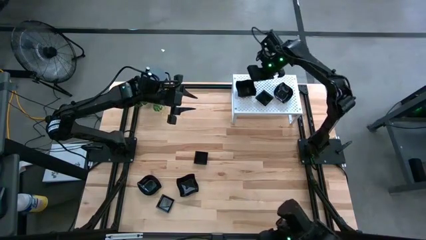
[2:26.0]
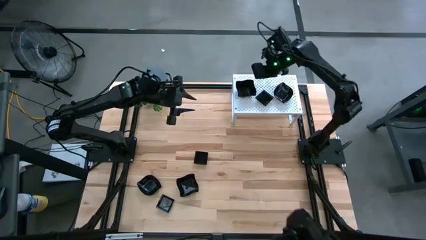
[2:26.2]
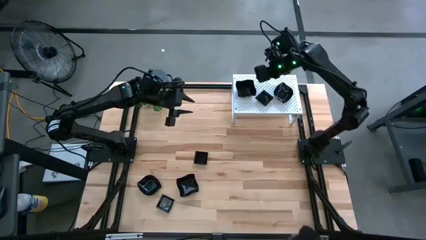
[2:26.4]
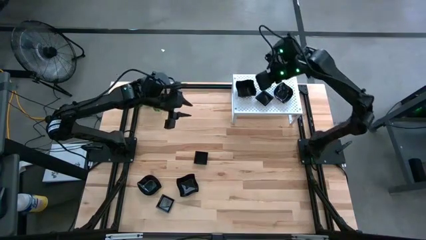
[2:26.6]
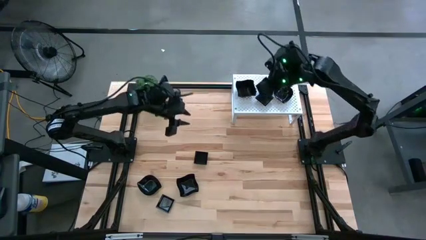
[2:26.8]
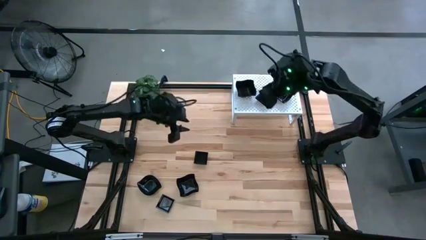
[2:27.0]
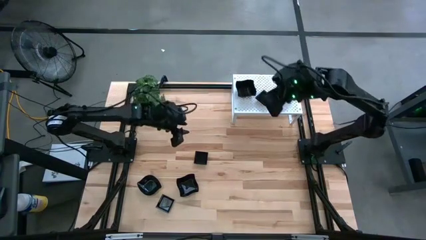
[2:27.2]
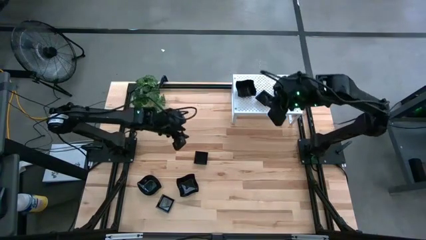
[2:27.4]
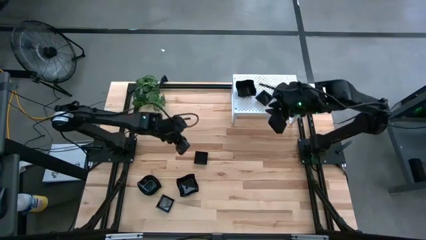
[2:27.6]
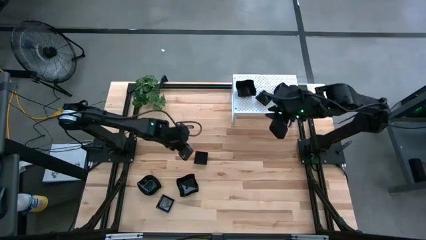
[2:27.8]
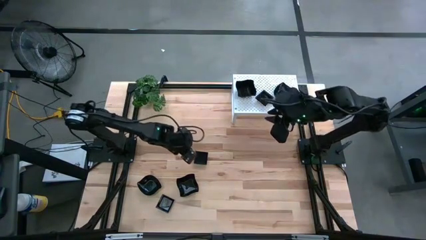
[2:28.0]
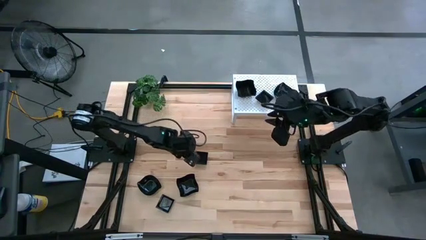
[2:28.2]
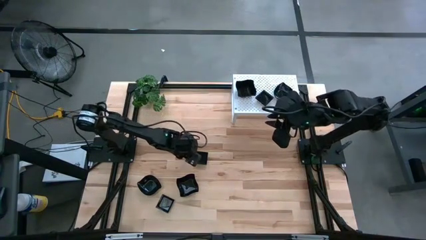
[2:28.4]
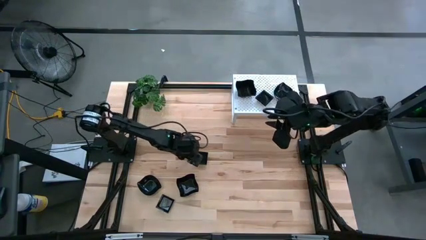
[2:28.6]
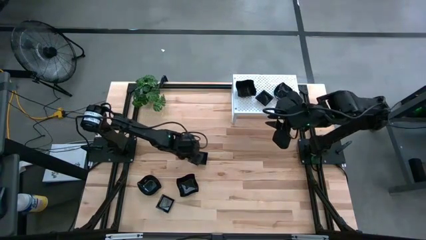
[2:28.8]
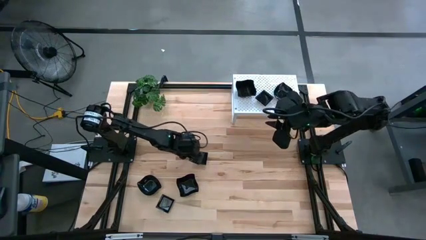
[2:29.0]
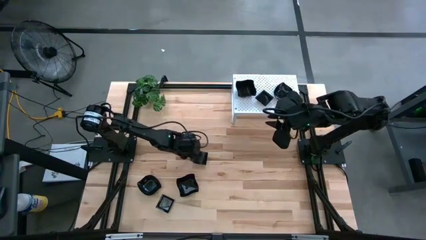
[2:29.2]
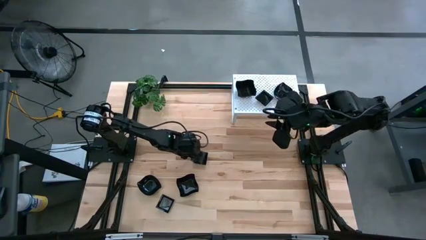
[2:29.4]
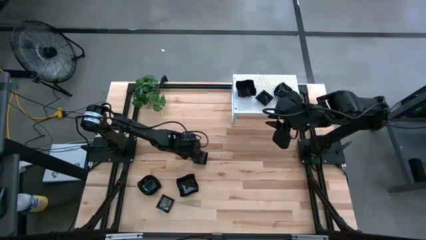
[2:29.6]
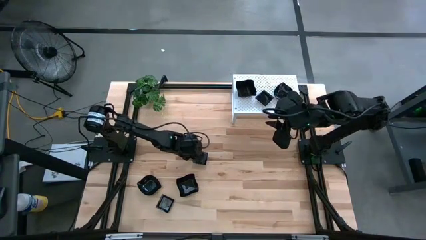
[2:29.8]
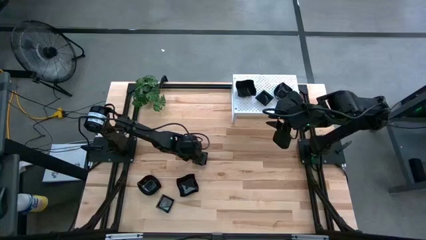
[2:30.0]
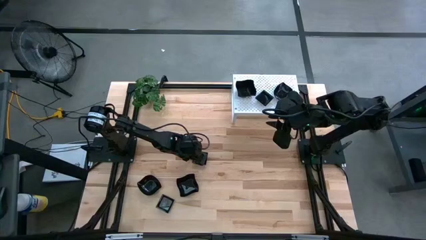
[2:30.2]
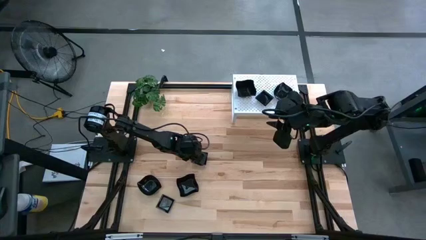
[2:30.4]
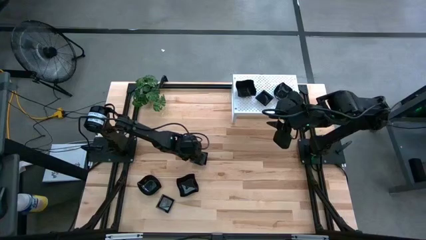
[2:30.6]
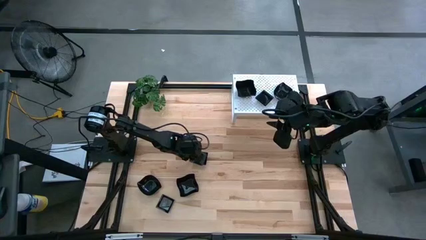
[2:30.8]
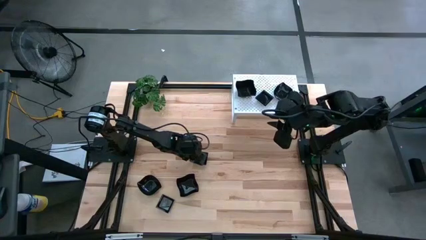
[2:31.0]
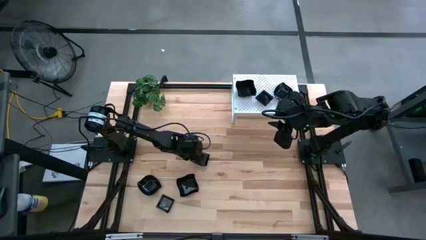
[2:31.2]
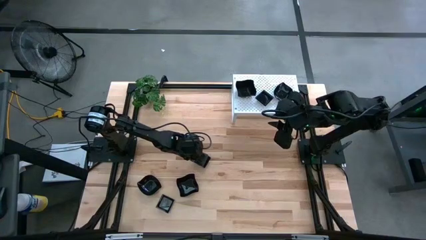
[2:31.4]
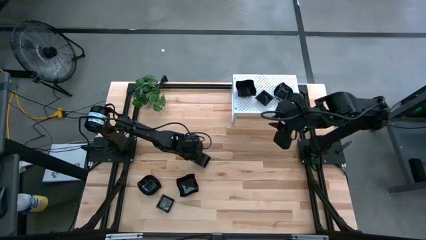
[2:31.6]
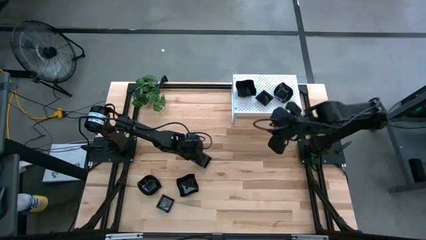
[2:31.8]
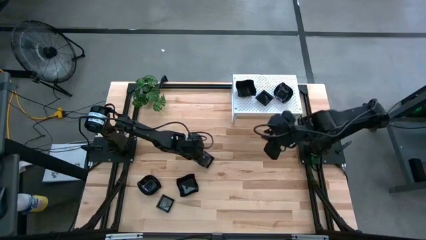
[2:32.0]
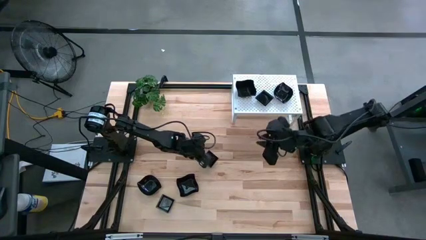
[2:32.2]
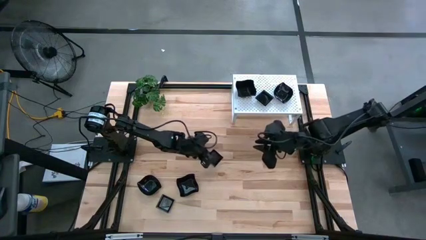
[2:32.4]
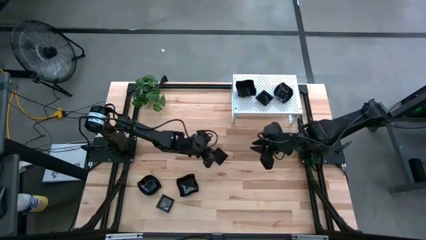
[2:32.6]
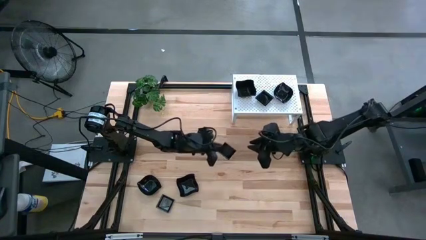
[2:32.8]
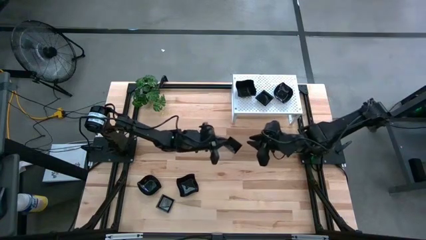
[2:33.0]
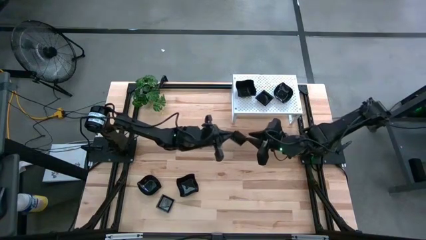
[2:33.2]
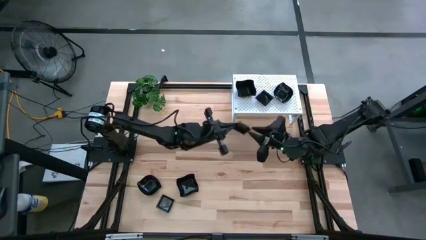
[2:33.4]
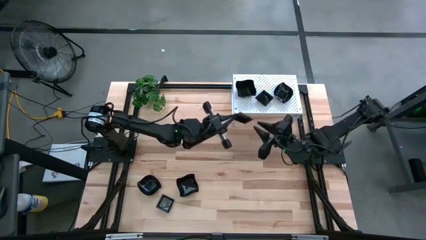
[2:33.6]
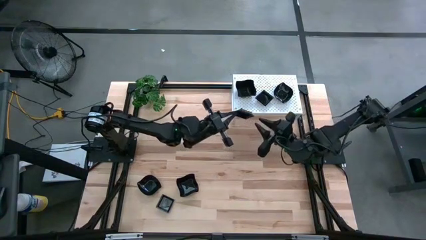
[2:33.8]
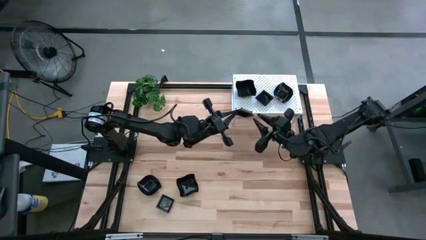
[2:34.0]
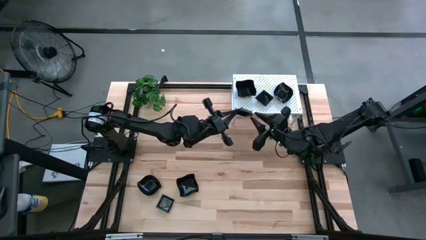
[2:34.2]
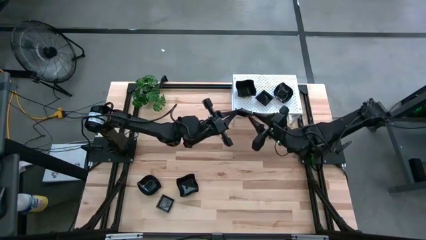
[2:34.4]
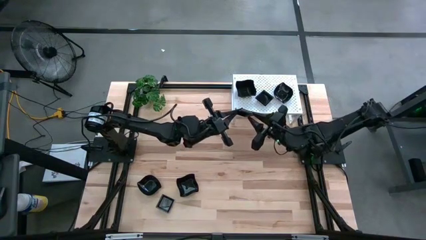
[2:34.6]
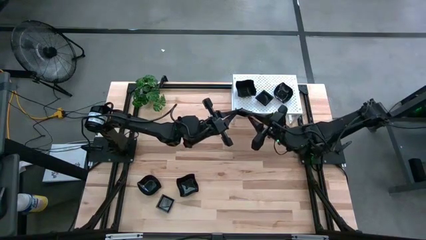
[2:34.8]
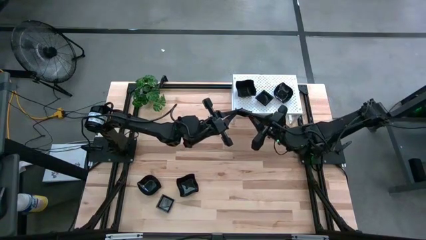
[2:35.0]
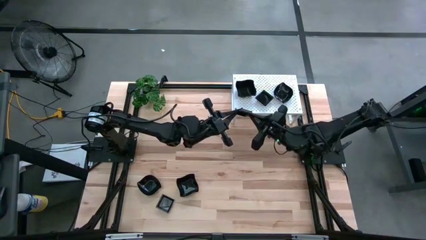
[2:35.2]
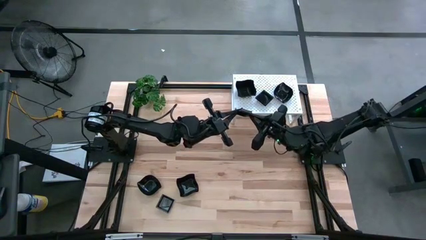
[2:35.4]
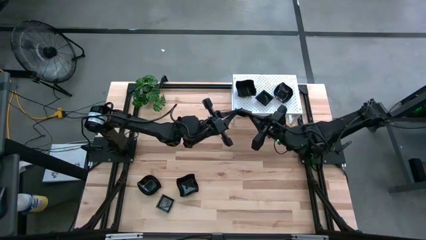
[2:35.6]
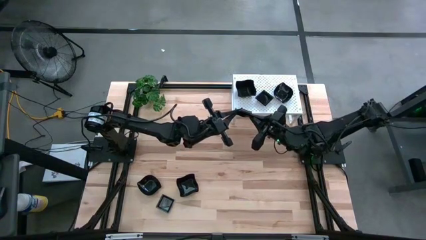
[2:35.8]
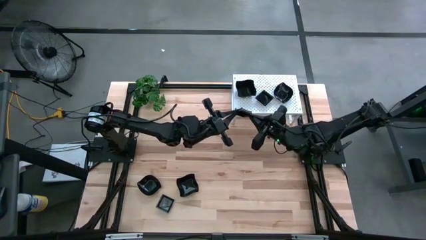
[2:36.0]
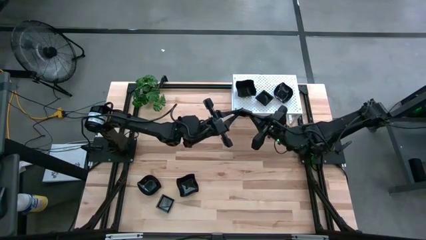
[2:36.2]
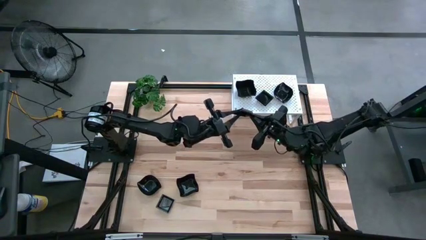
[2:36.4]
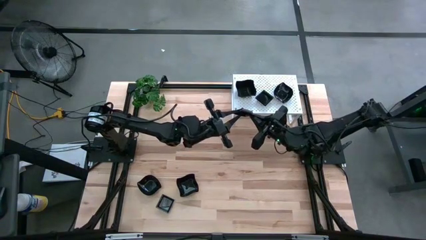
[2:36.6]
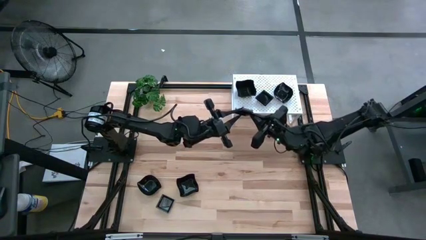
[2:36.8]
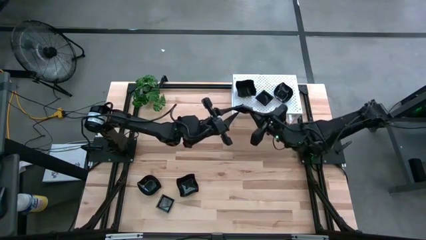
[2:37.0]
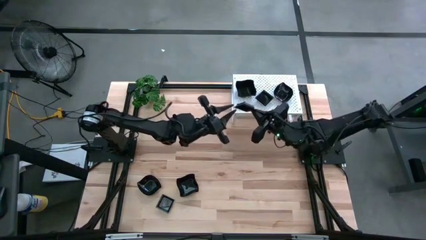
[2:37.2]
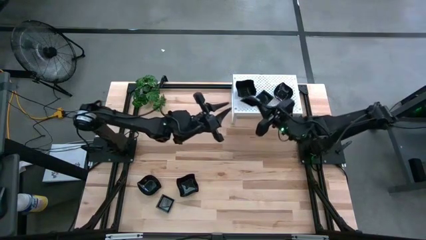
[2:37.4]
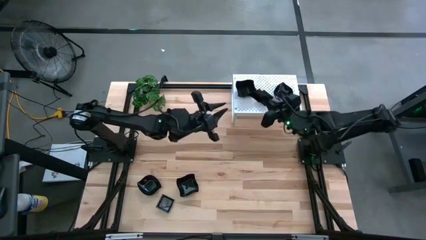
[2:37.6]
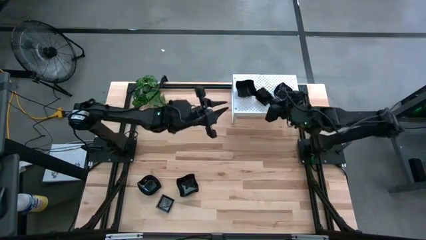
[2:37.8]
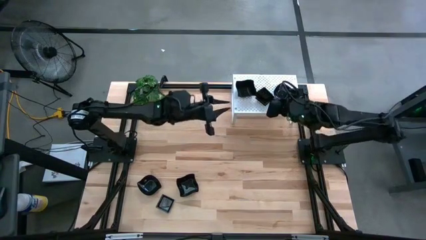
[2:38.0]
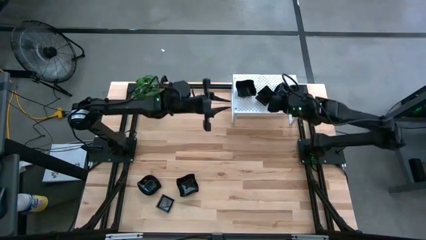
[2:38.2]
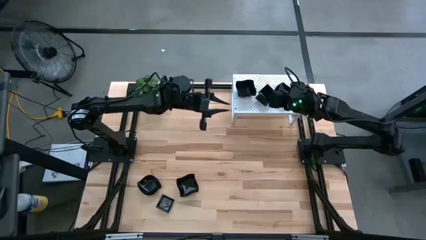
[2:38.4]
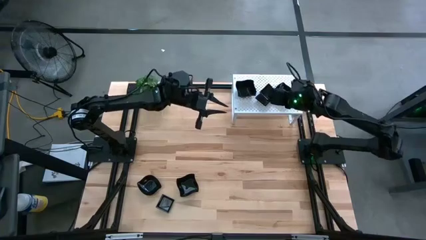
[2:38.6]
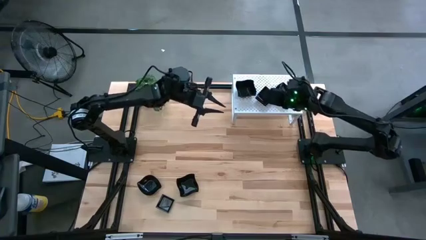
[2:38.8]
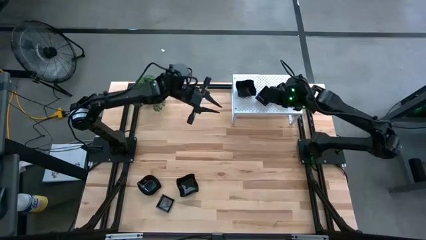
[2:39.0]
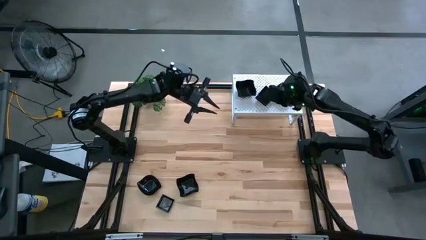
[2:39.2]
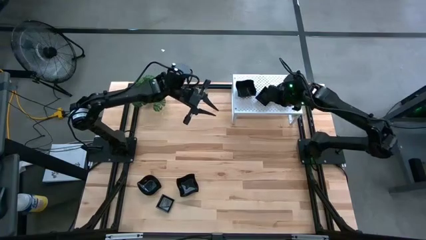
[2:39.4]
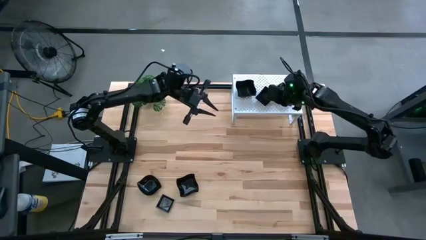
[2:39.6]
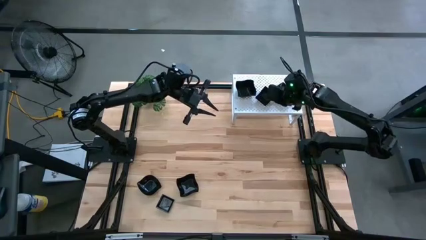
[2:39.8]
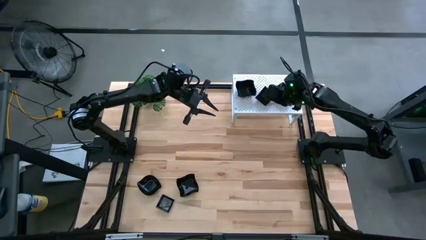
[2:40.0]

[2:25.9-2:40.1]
Task: Pick & Place Mini shaped plates
Stack the square plate on top of the square plate on the shelf

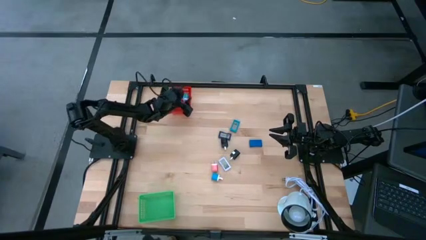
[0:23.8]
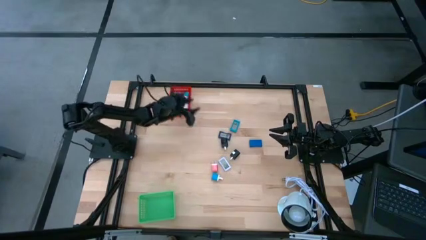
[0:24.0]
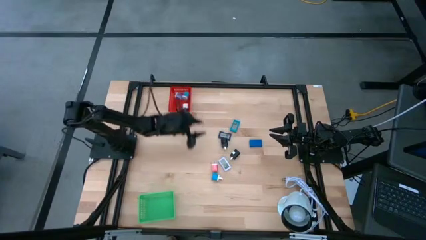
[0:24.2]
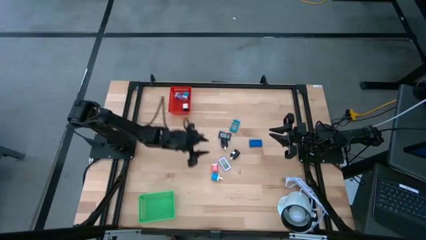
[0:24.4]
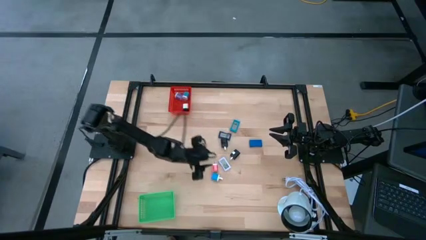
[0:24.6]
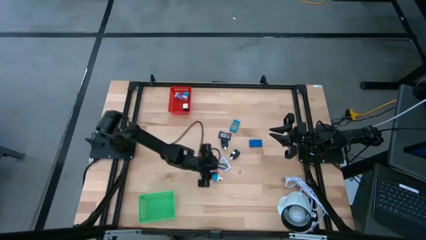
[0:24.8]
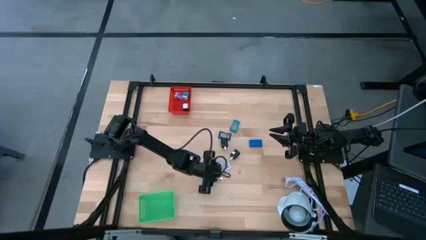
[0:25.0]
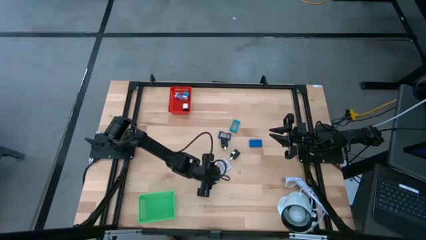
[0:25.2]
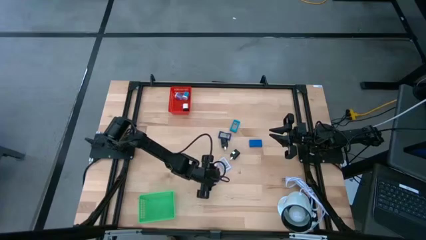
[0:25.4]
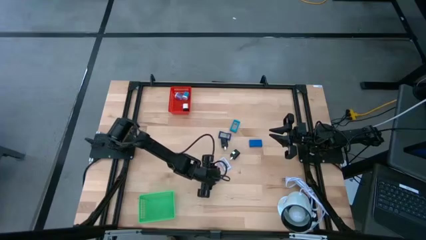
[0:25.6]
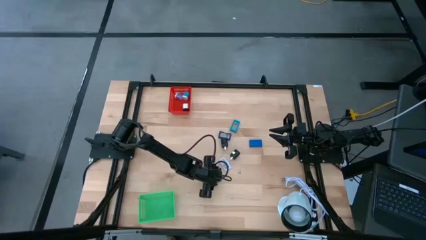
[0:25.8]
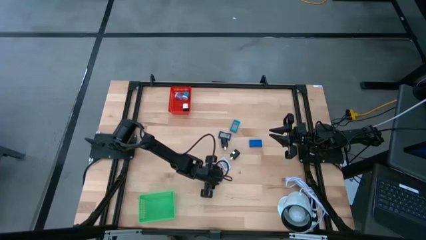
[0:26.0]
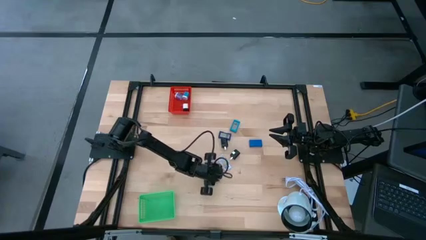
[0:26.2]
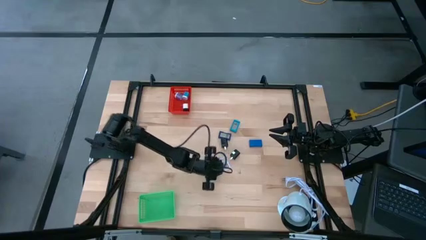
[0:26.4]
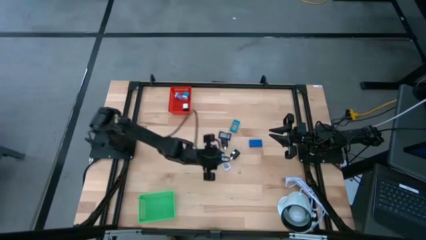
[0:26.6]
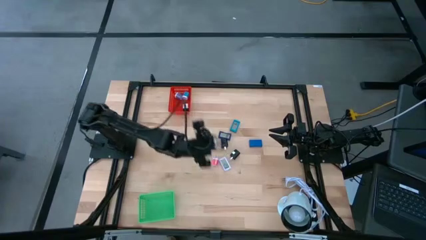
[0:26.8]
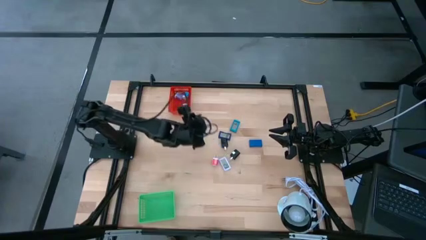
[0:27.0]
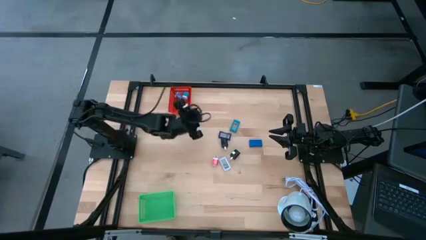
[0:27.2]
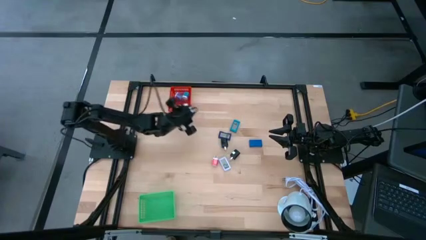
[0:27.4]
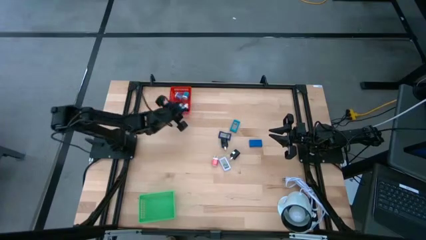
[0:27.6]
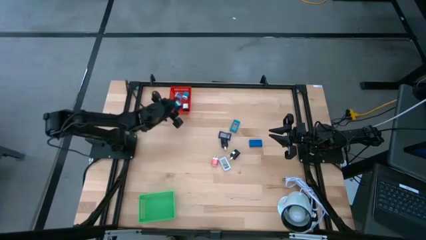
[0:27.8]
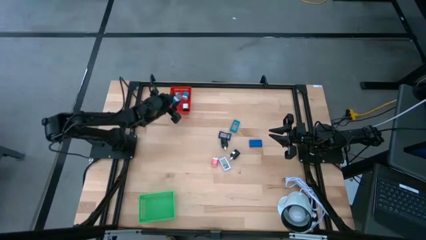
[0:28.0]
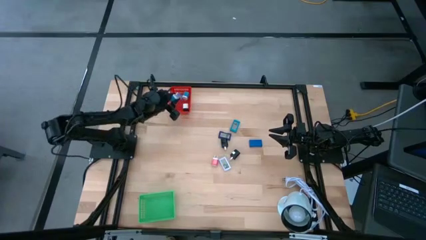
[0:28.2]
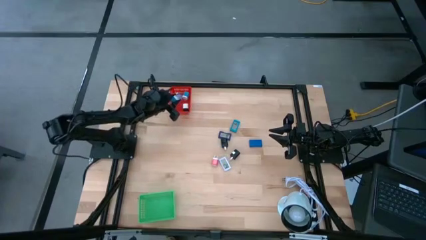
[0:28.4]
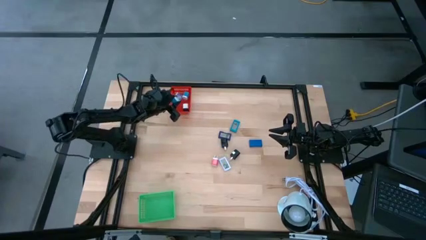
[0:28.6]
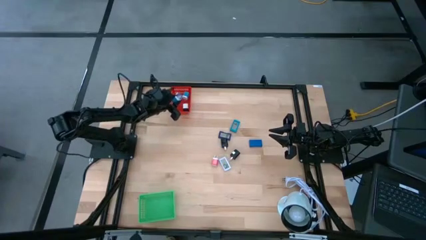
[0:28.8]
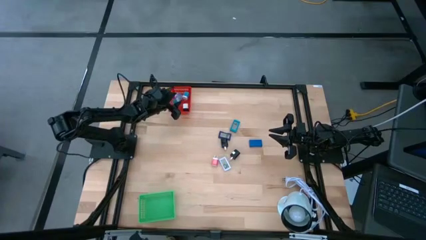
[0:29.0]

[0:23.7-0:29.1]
Task: Pick & Place Office items
Put the blue charger adapter into the red bin
